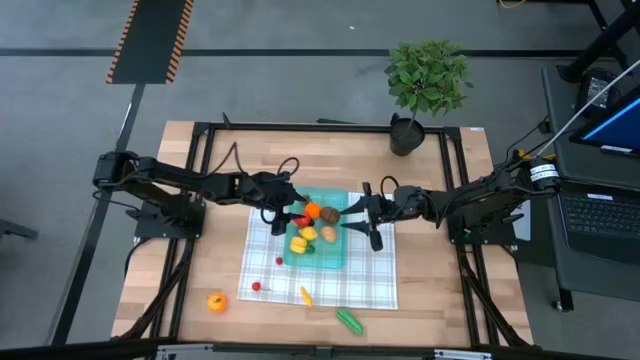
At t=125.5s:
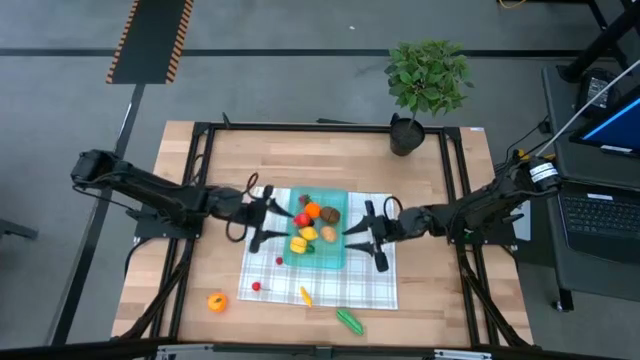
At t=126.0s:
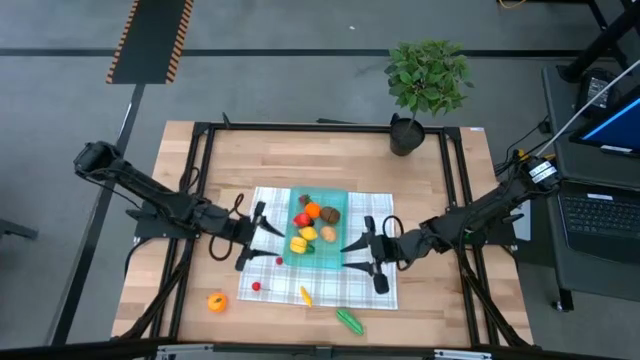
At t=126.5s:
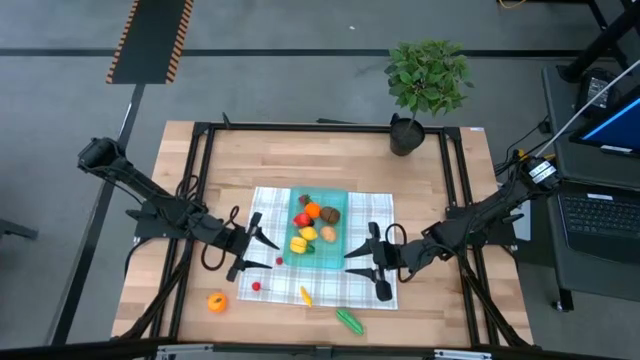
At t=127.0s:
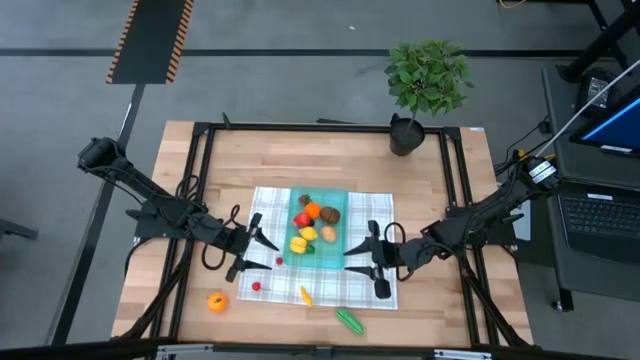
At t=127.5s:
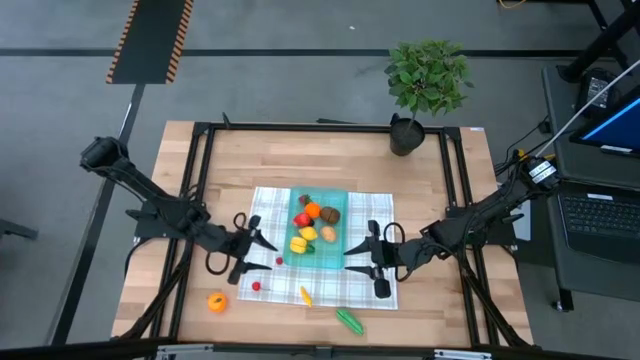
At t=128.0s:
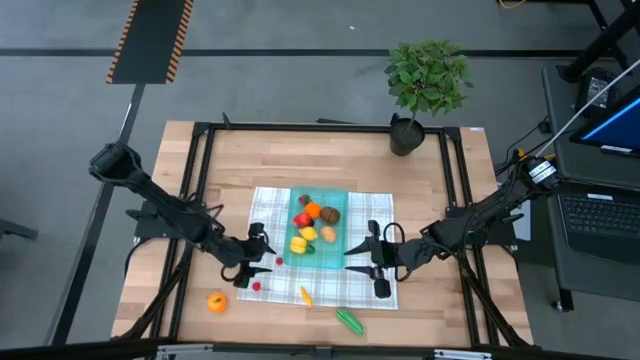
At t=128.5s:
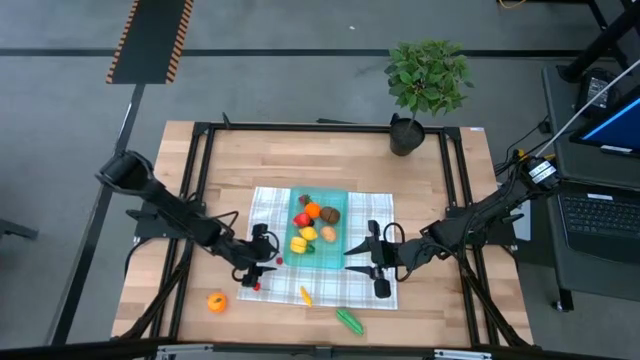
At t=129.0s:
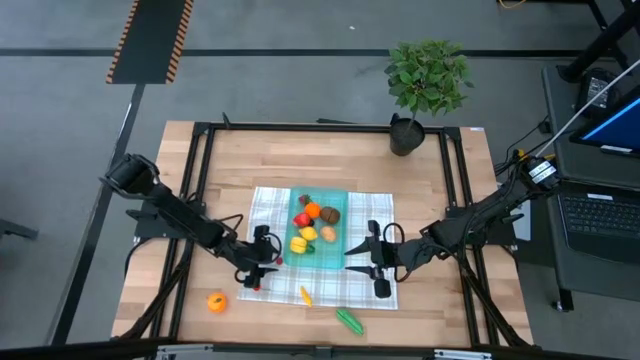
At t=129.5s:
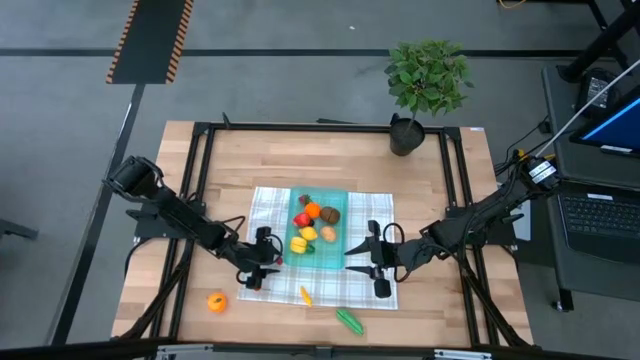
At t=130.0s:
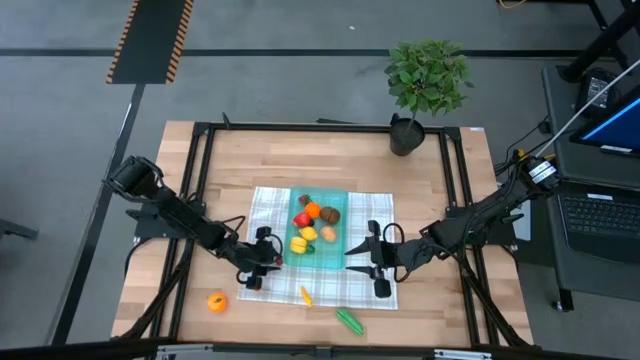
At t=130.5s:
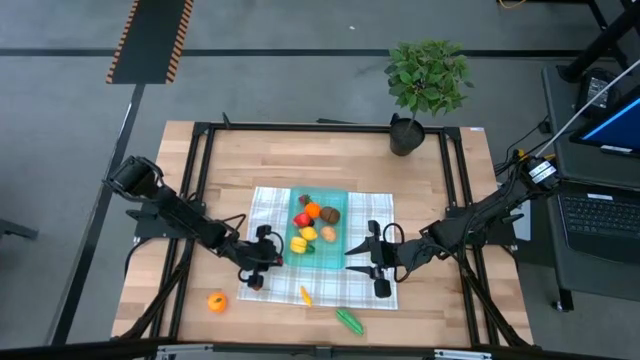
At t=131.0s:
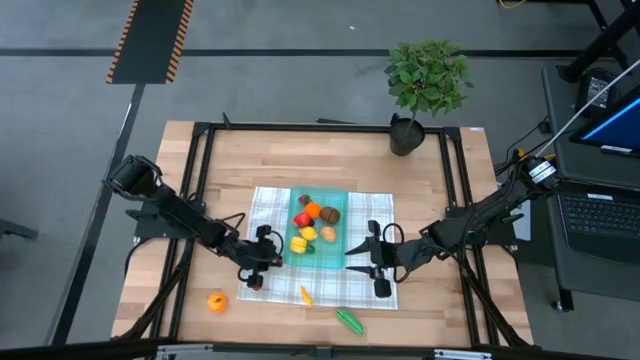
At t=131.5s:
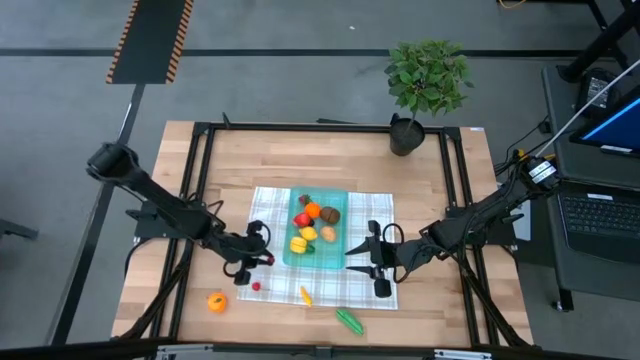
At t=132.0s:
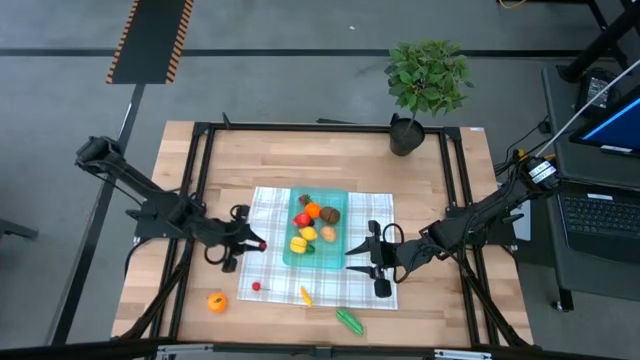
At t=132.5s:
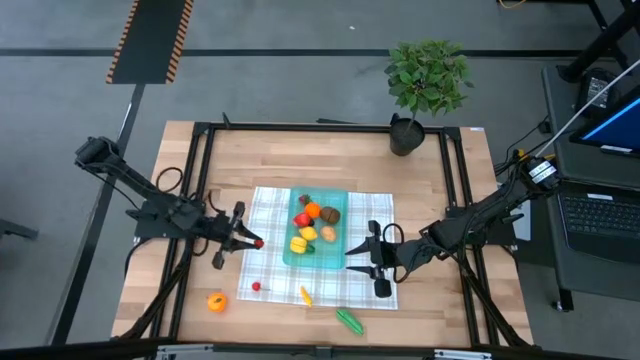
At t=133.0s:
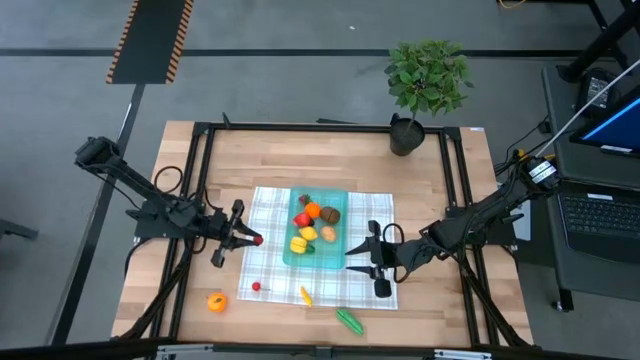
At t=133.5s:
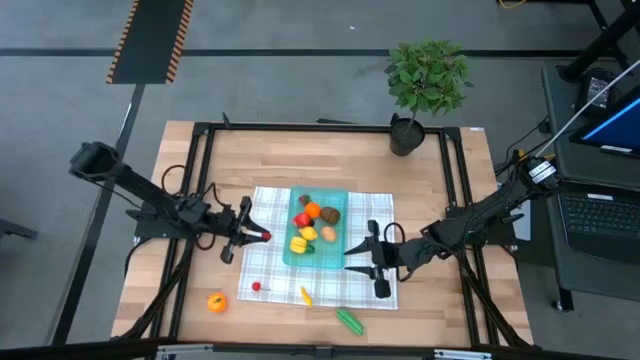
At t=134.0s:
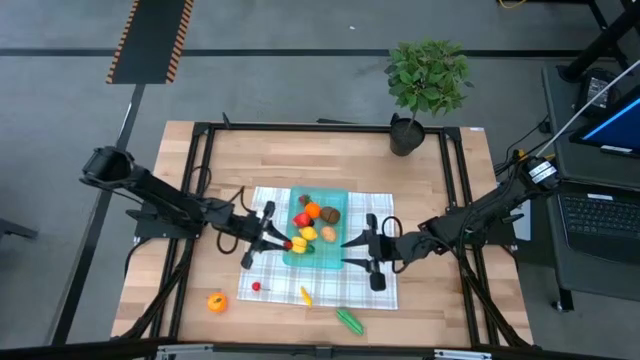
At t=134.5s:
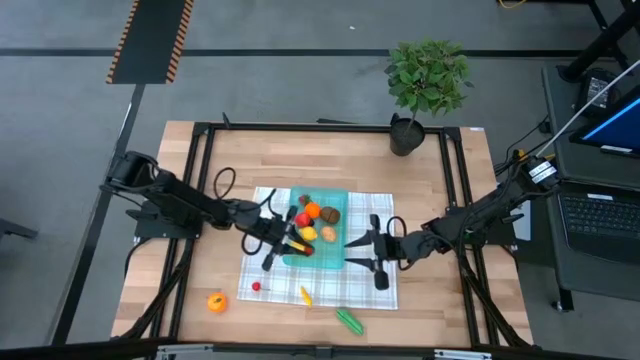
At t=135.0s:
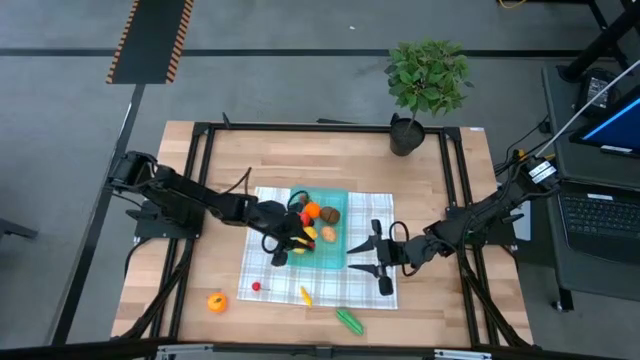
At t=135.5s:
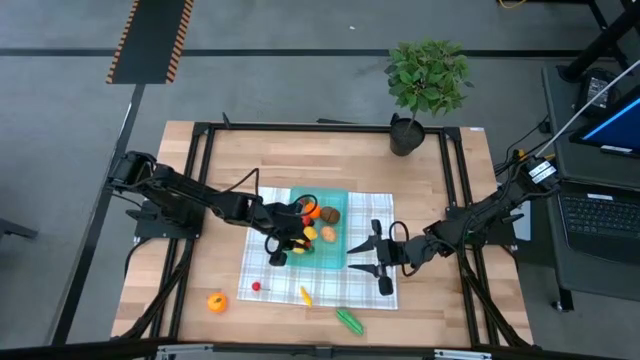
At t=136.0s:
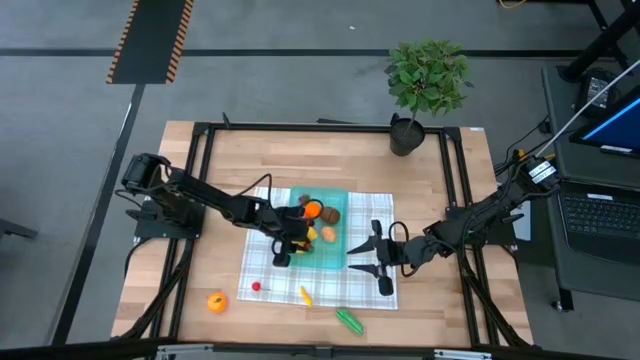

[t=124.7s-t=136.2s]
Task: Pick and placing Produce into tupperware
Put the red raspberry into the blue bin
